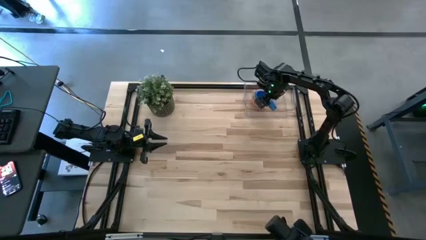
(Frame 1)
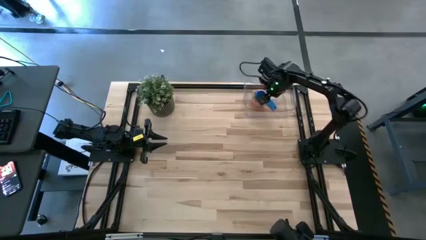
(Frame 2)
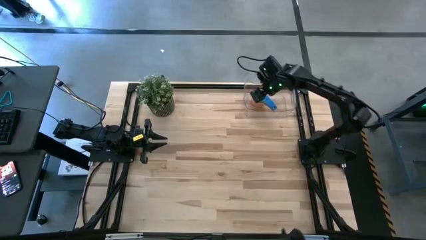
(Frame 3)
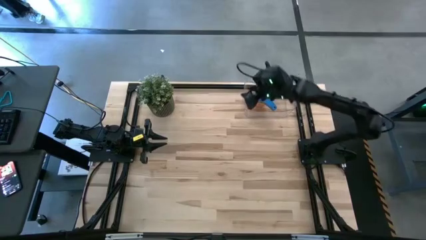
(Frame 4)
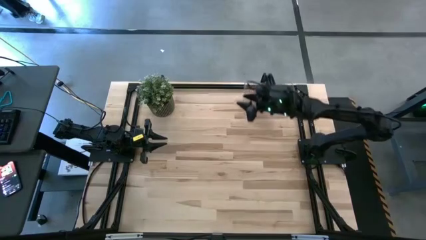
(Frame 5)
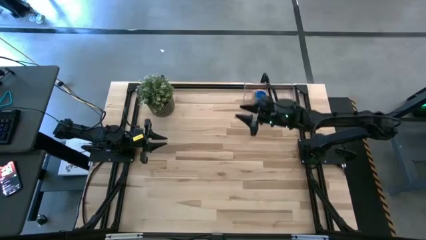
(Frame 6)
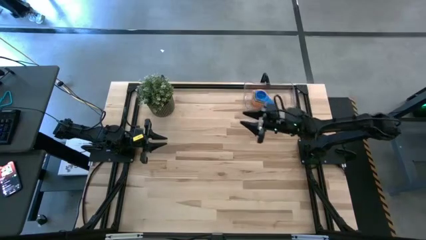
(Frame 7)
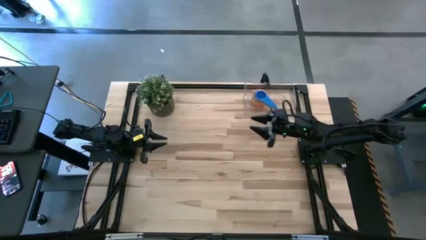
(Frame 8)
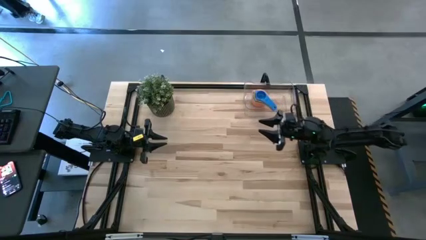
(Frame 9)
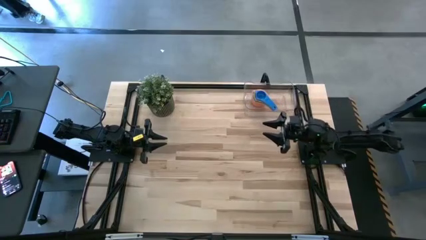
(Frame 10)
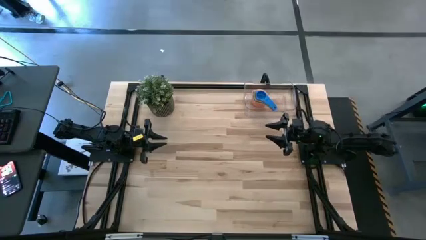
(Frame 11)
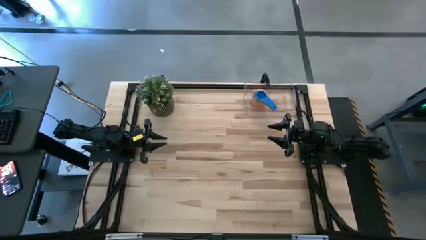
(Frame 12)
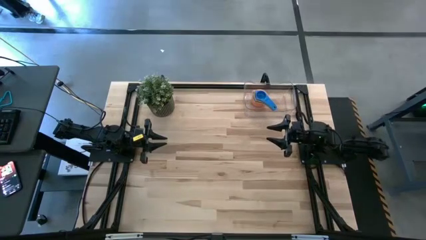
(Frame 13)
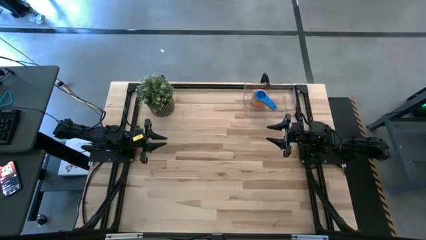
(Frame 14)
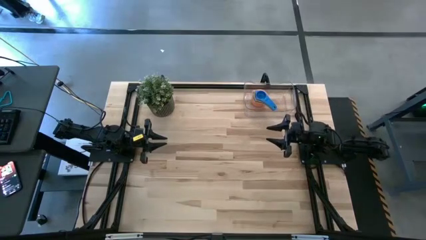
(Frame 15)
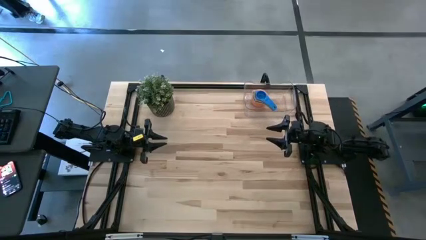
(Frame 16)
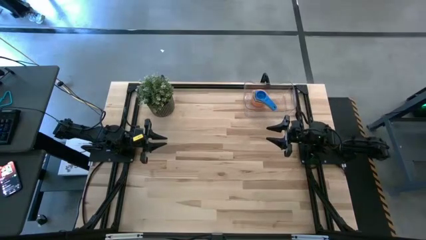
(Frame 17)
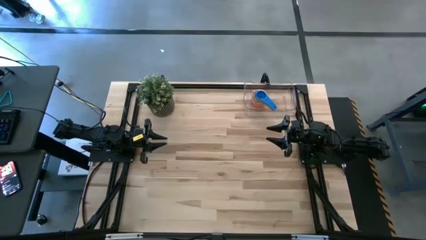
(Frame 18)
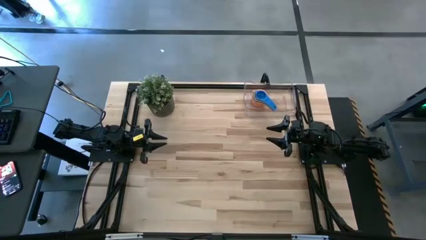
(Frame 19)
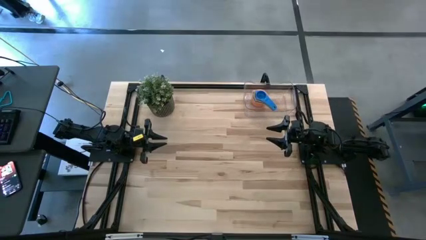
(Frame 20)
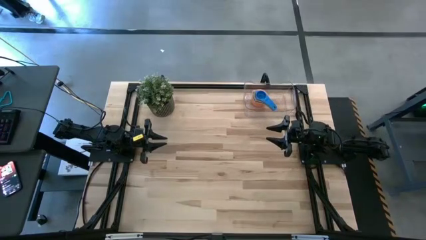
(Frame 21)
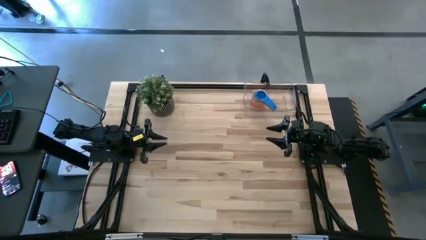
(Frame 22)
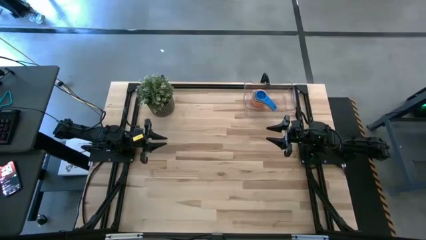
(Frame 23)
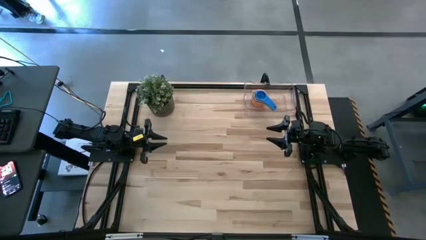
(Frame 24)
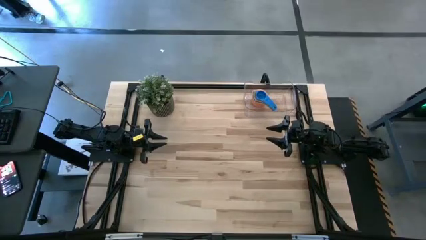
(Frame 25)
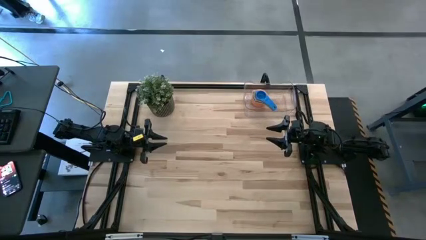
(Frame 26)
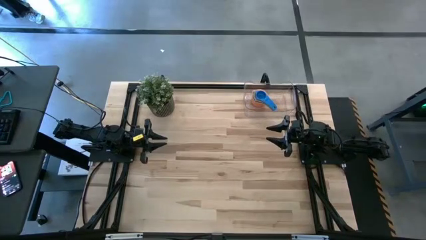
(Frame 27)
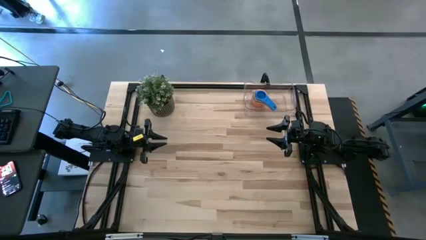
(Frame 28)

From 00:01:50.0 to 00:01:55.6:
Task: Nest measuring cups in basket
Return to Home Position

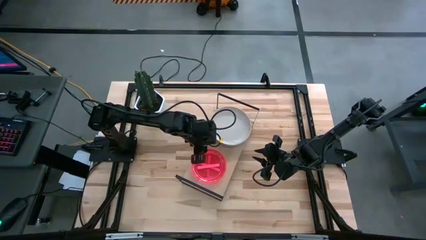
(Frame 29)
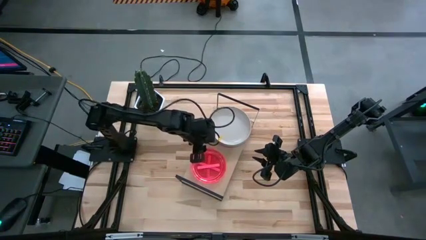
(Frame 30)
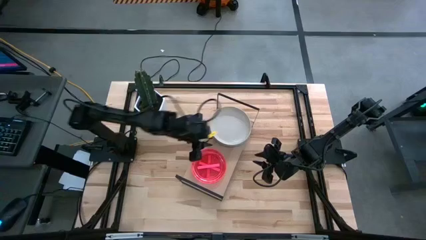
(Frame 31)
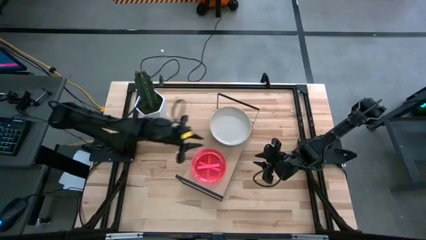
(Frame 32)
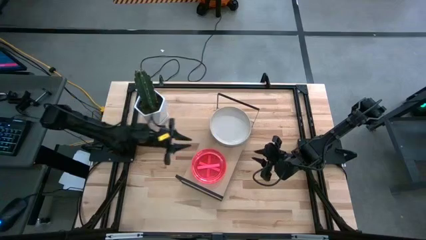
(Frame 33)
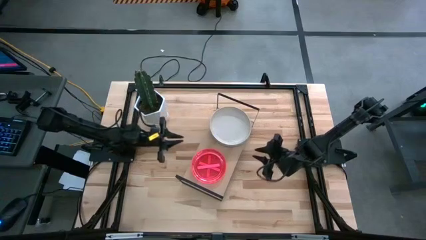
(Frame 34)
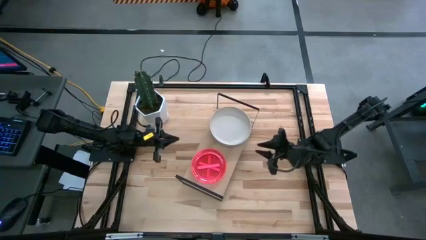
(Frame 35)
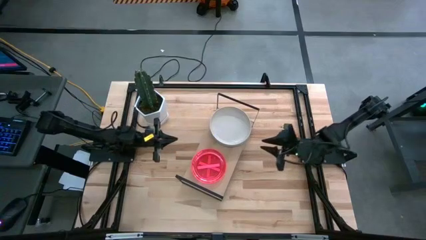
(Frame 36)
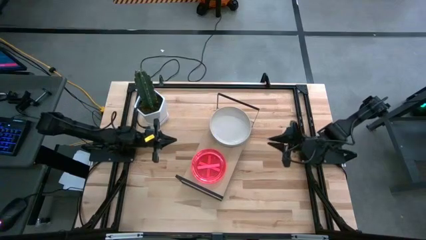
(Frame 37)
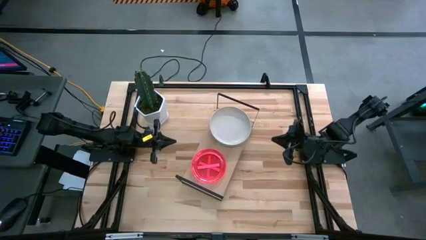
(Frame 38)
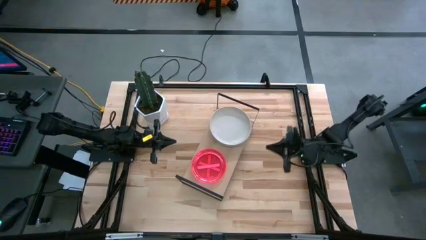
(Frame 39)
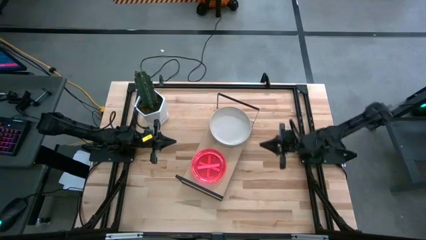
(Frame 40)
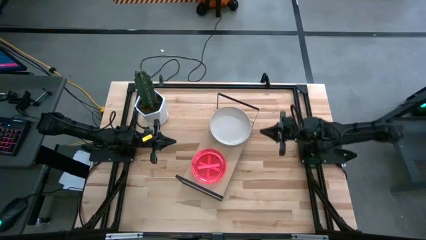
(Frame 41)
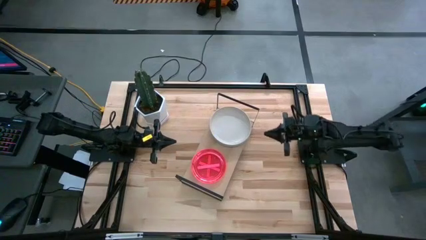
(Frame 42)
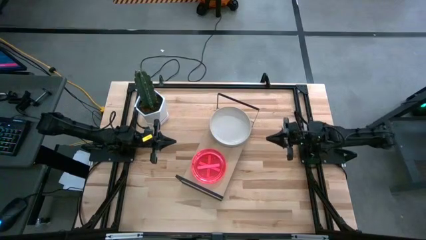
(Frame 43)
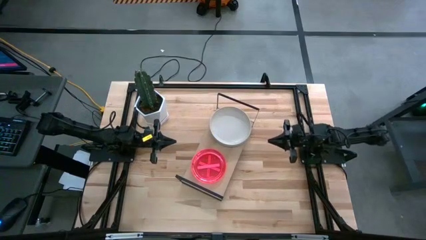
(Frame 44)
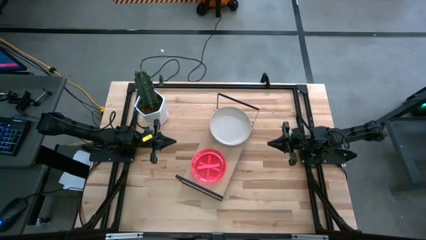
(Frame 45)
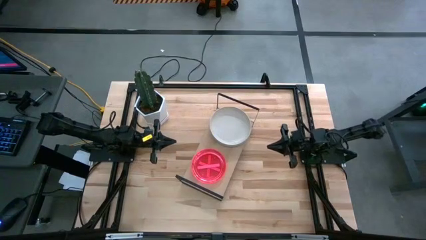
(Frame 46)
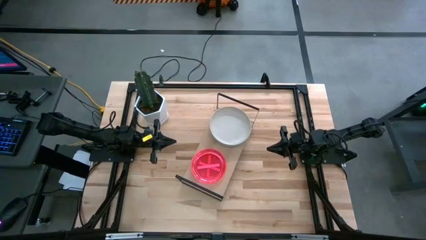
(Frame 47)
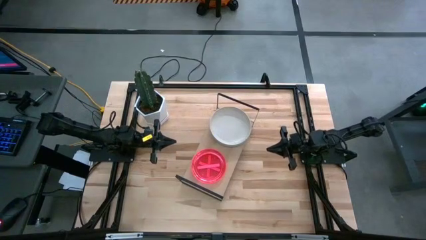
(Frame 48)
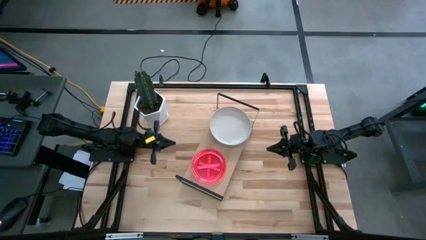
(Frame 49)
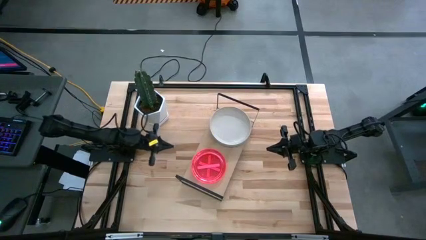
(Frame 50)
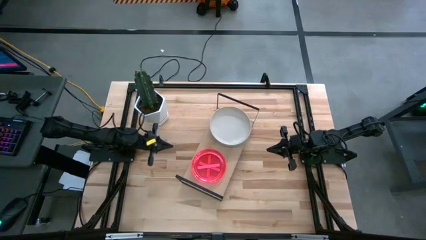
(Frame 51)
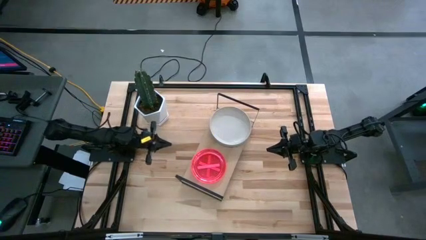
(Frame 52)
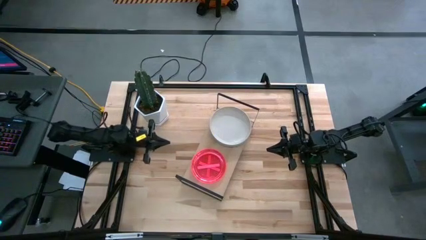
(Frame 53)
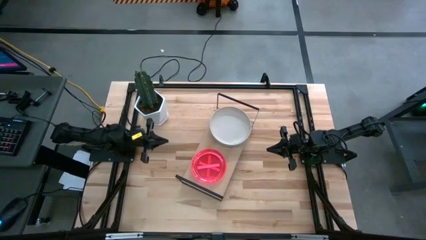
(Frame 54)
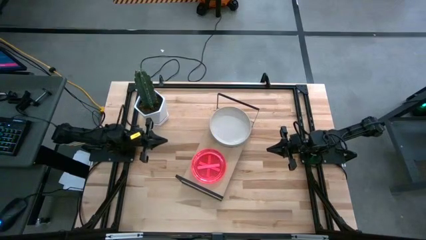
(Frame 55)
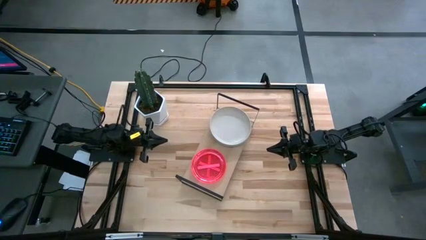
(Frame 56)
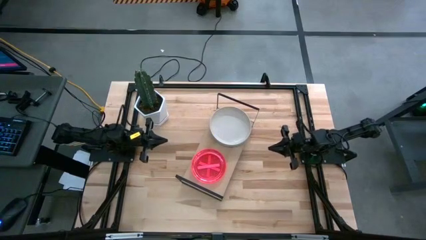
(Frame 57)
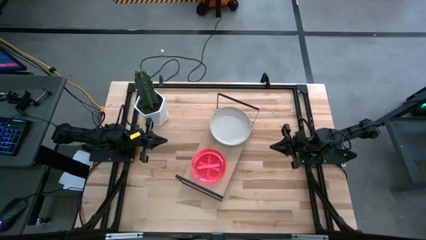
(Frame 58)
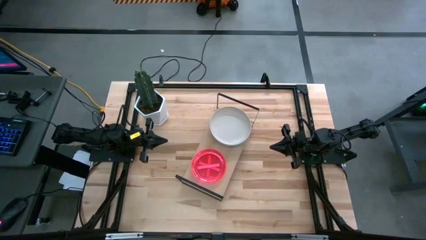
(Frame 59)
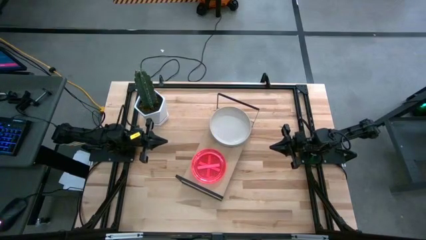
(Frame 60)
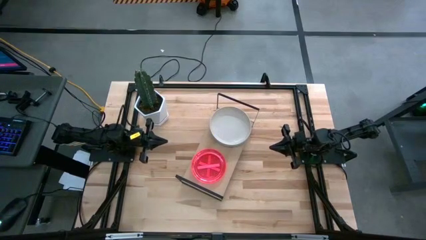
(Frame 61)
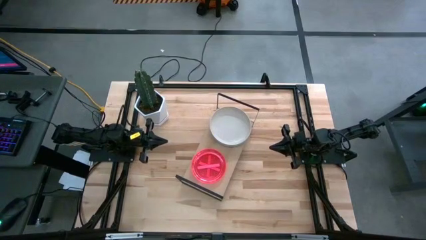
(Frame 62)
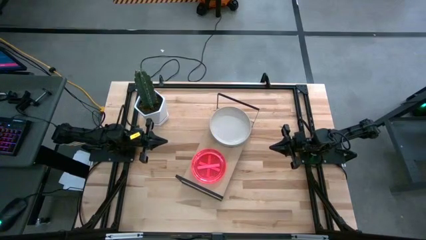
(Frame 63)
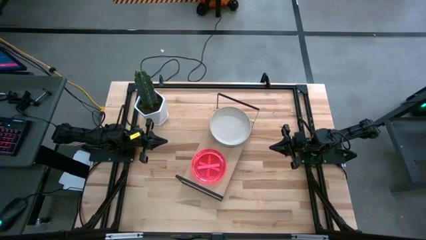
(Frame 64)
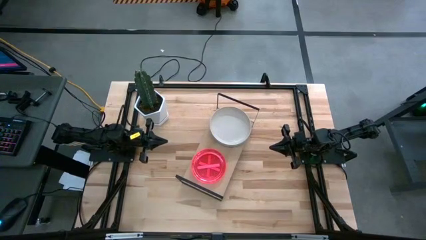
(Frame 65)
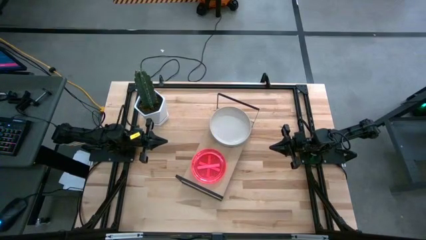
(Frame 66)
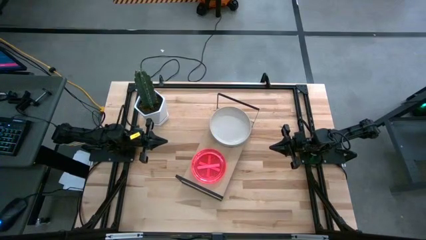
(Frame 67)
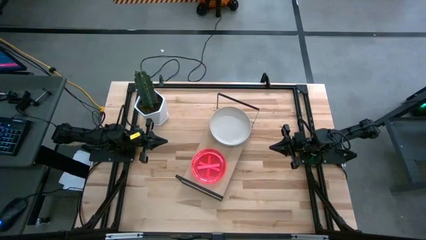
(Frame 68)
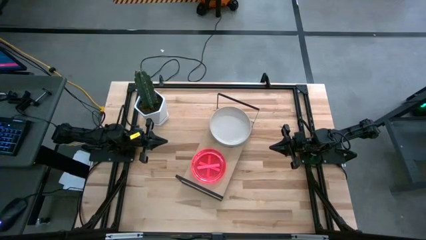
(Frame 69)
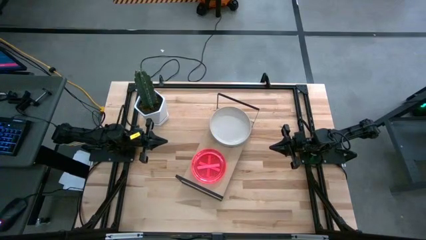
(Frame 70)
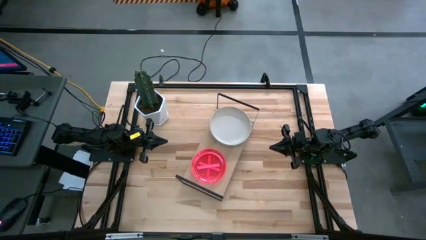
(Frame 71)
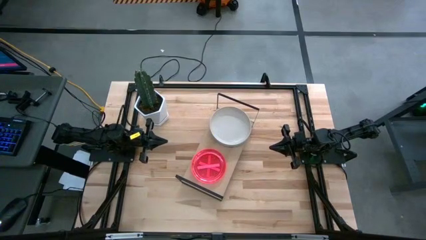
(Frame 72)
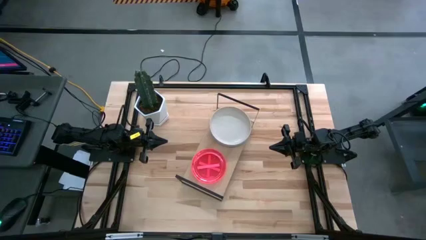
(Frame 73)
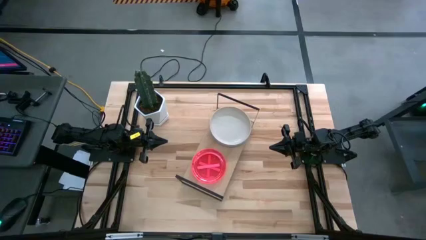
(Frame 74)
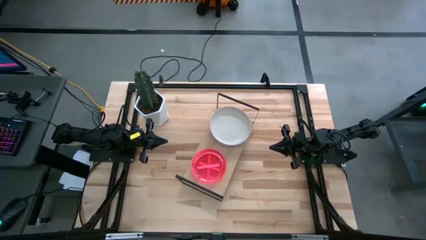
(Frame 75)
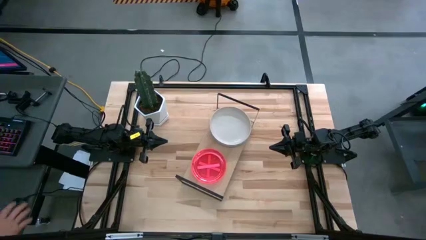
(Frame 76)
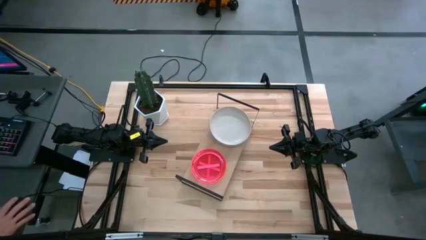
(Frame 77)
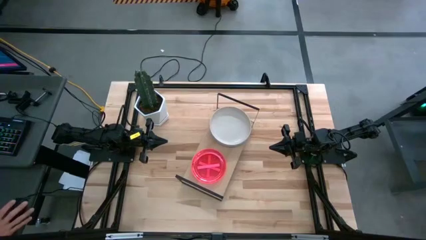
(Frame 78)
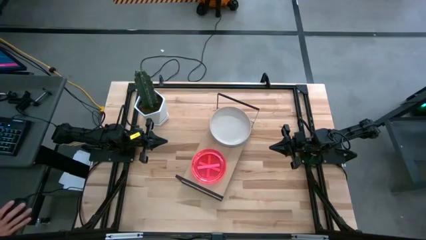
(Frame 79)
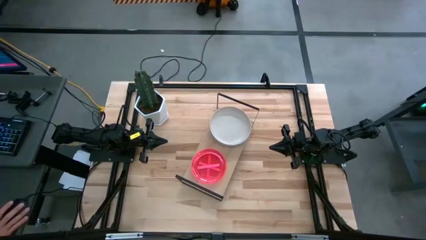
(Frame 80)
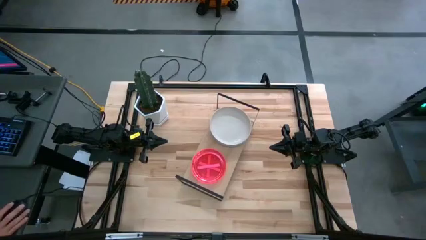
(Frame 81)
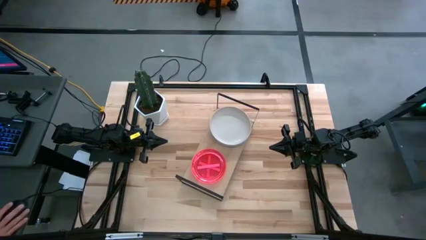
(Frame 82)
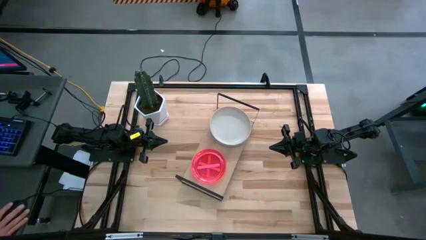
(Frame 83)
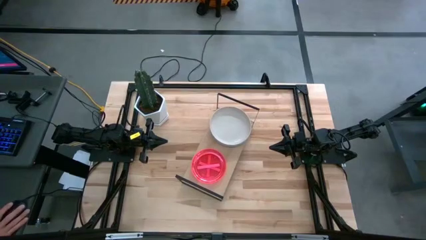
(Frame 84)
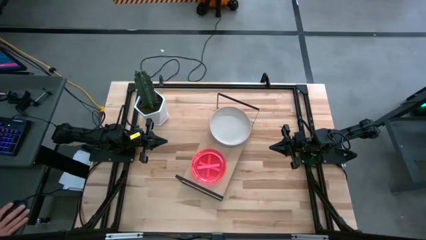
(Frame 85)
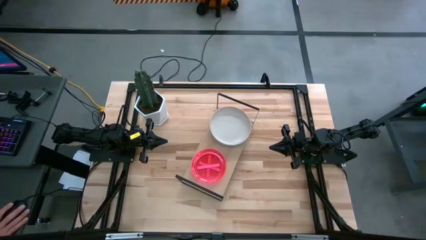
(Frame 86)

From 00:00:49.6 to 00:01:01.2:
Task: Place and stack plates onto a shelf
Return to Home Position
